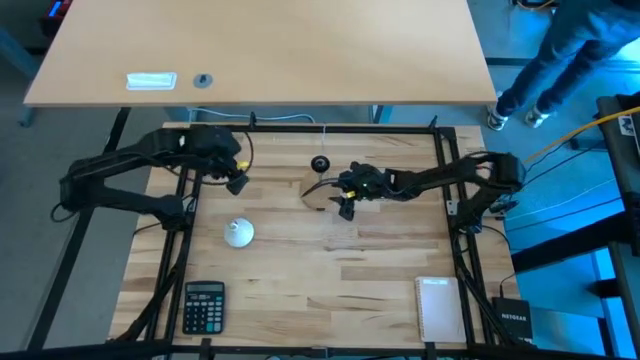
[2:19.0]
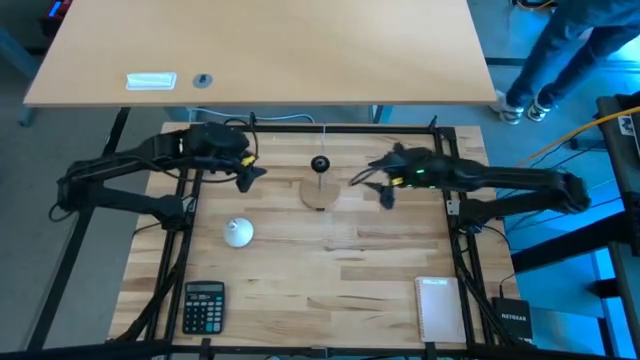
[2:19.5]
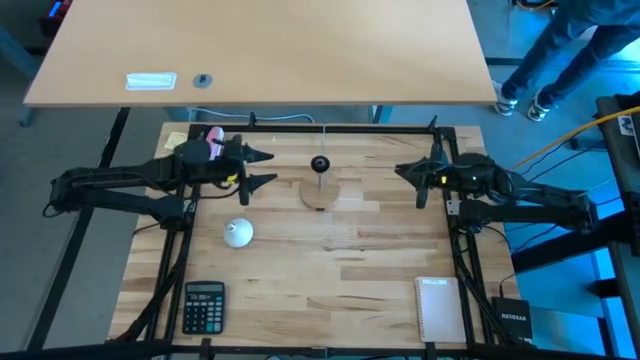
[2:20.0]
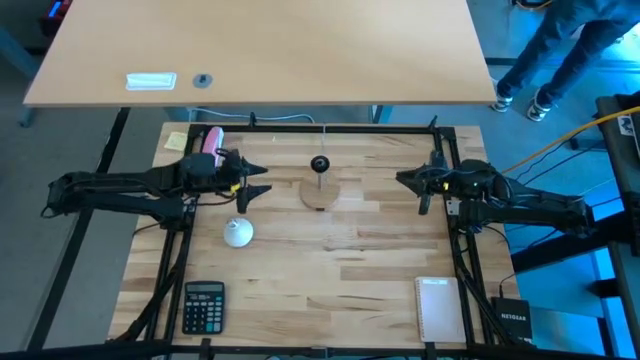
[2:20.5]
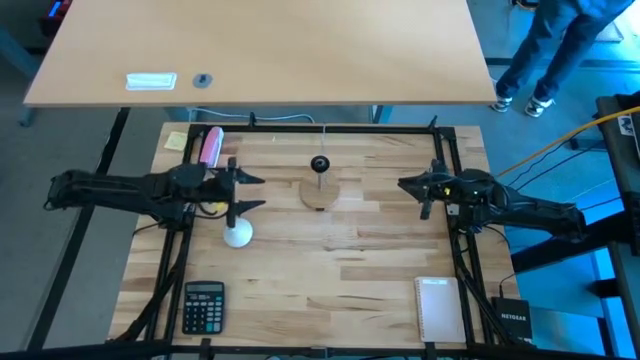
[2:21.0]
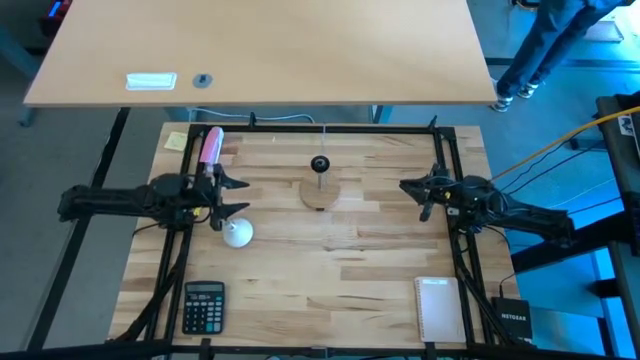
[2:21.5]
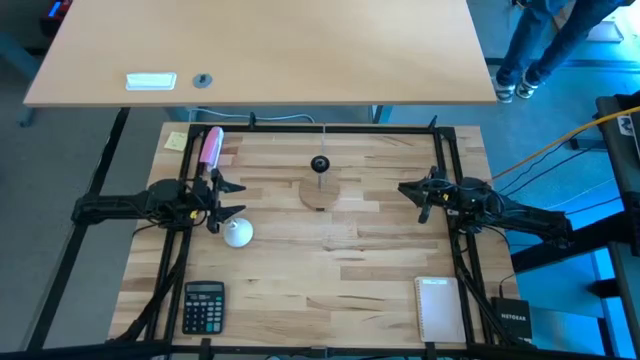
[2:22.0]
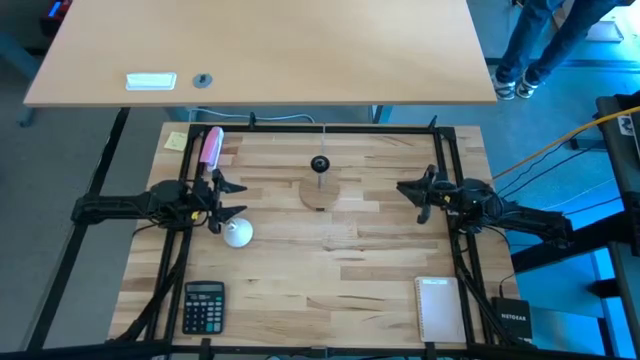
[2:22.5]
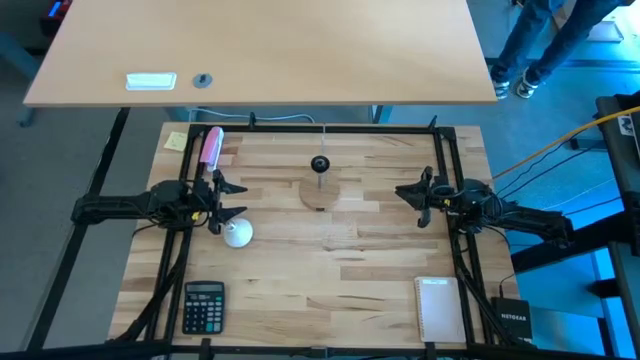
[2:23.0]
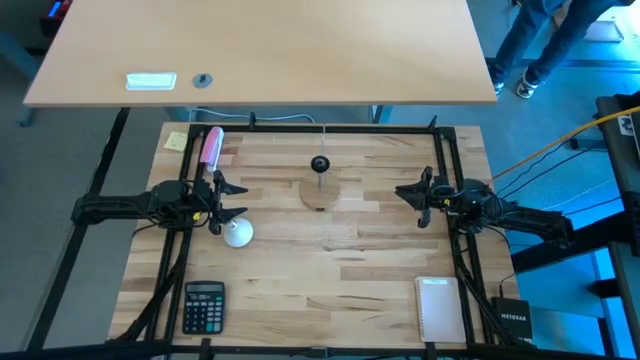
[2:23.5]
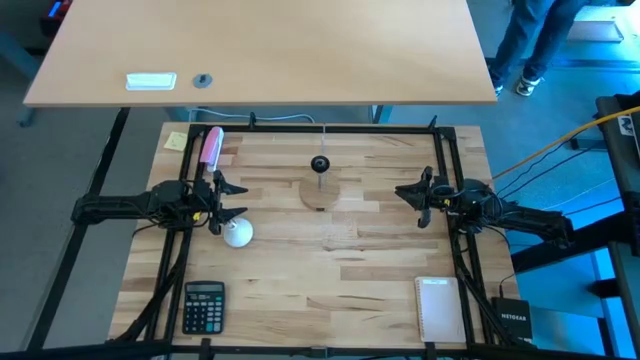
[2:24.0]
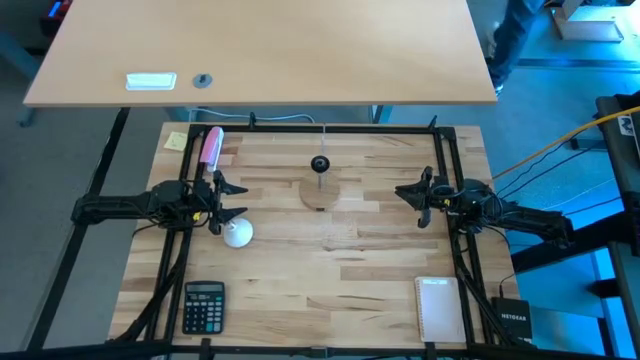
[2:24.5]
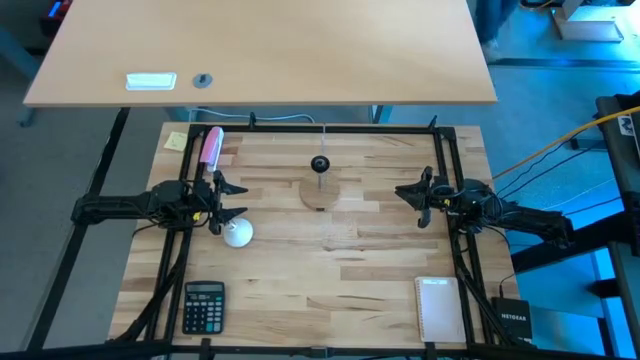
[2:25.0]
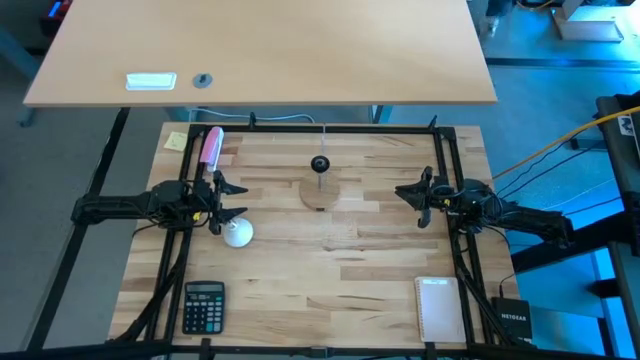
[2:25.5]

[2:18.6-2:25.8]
Task: Screw lightbulb
Return to Home Position

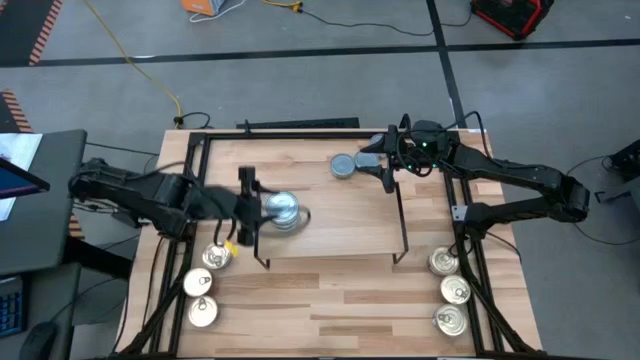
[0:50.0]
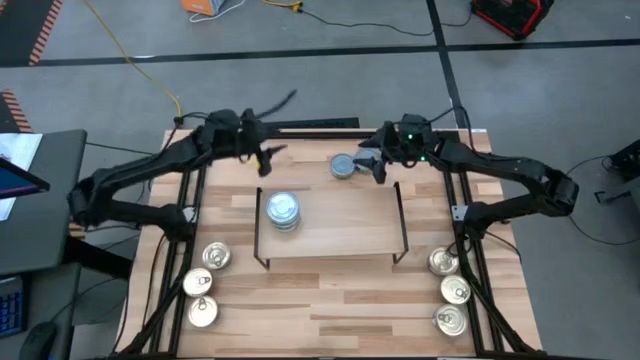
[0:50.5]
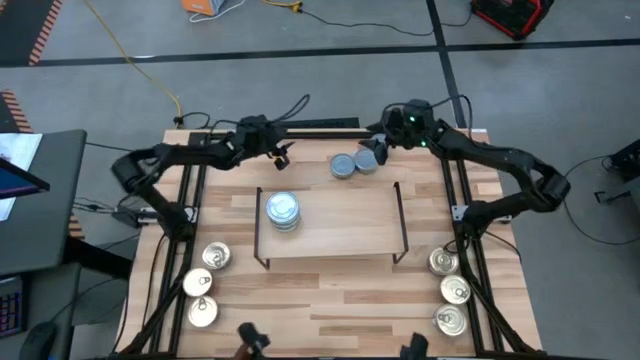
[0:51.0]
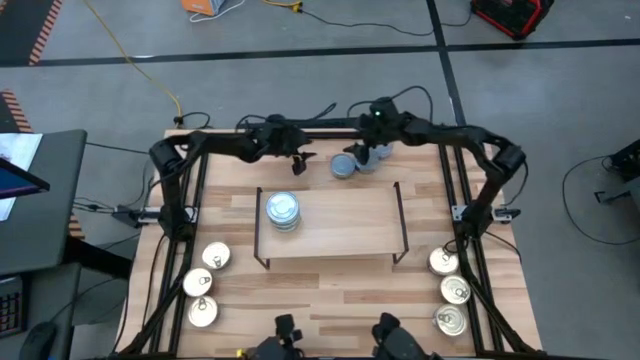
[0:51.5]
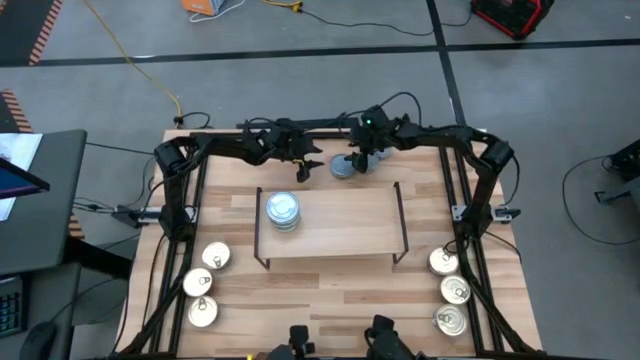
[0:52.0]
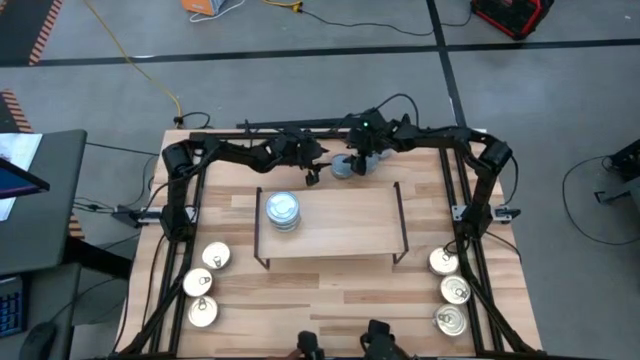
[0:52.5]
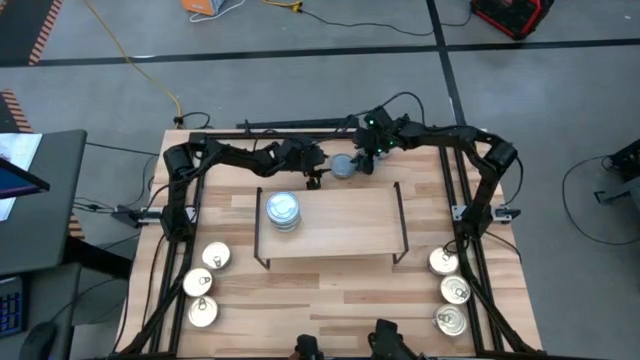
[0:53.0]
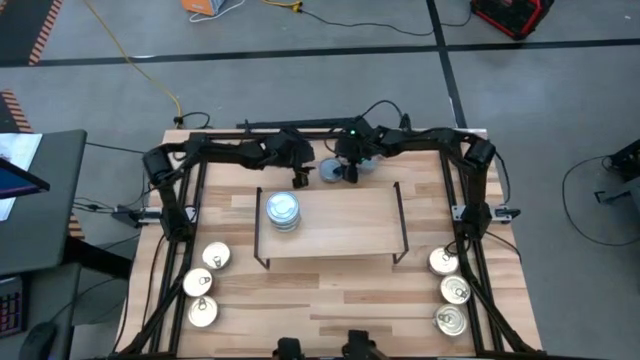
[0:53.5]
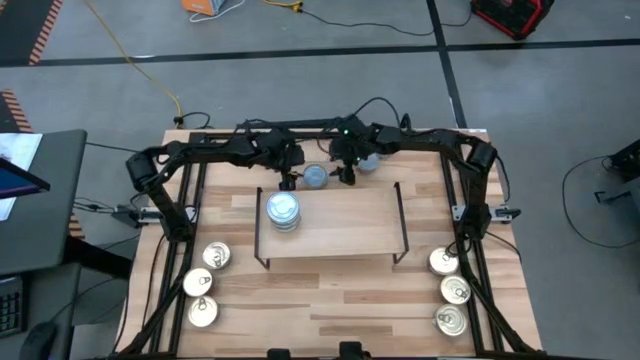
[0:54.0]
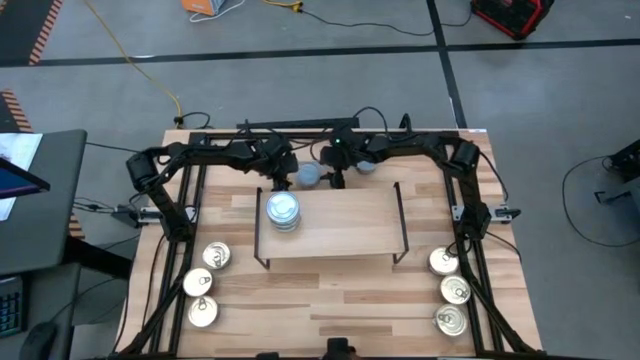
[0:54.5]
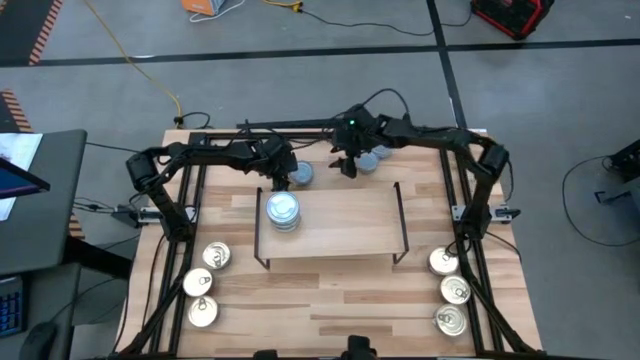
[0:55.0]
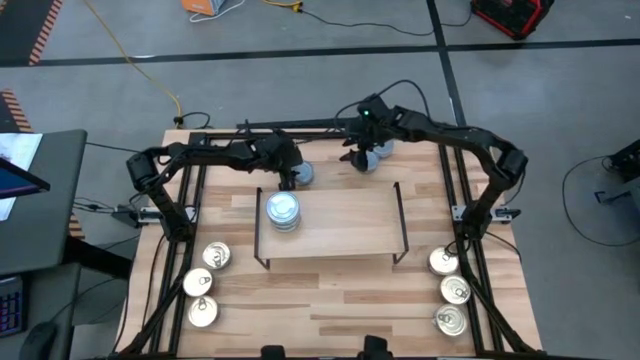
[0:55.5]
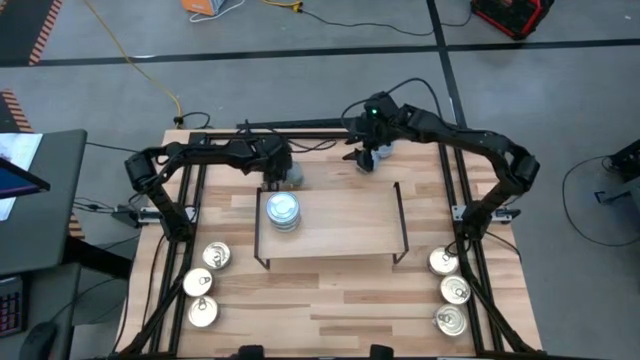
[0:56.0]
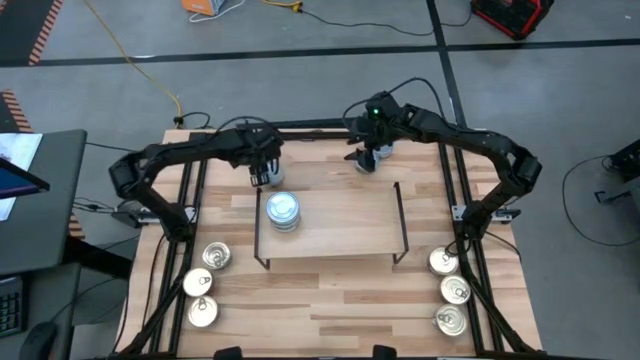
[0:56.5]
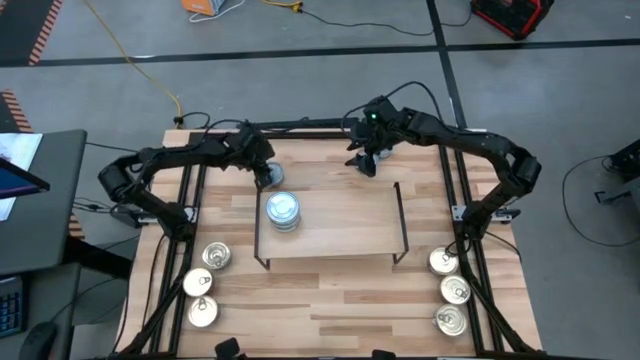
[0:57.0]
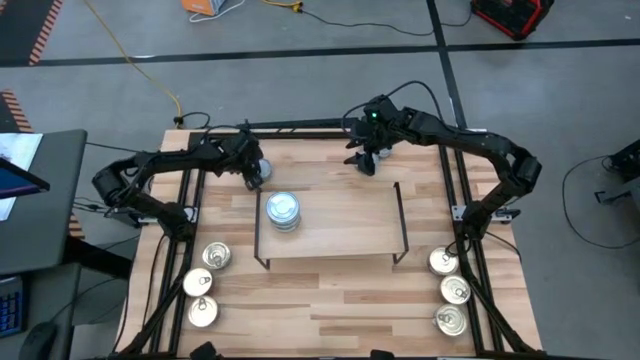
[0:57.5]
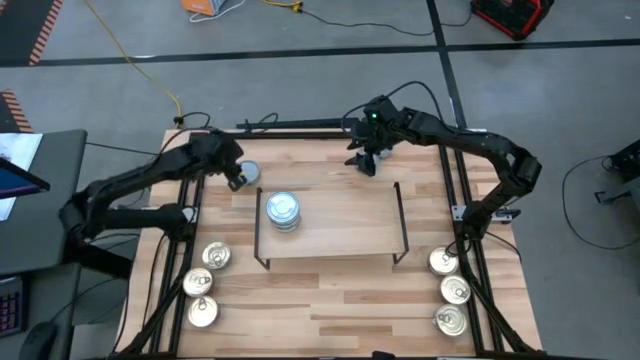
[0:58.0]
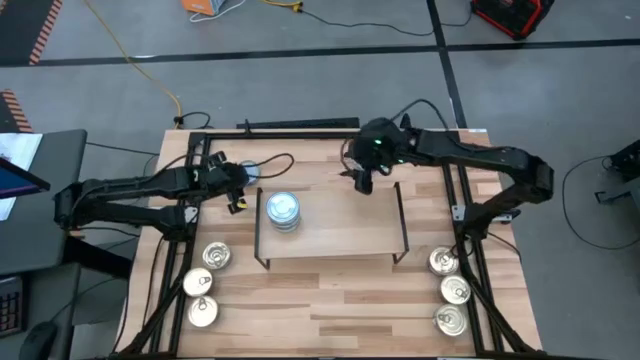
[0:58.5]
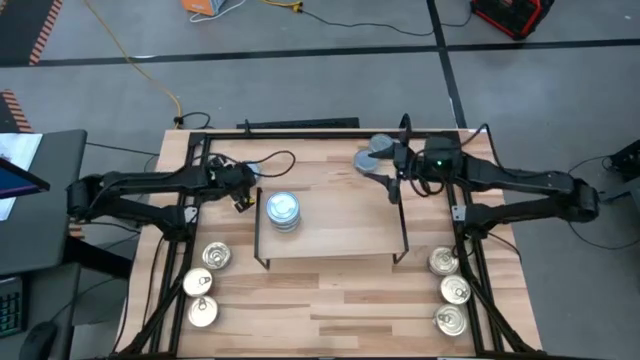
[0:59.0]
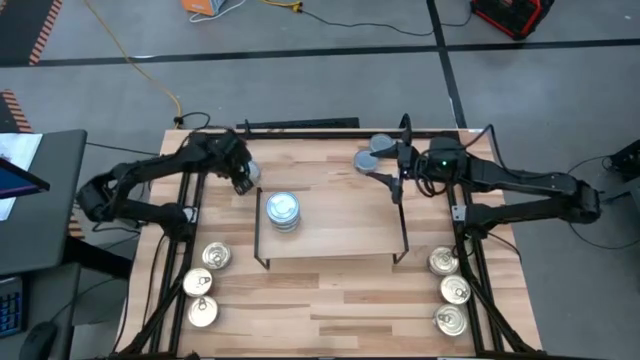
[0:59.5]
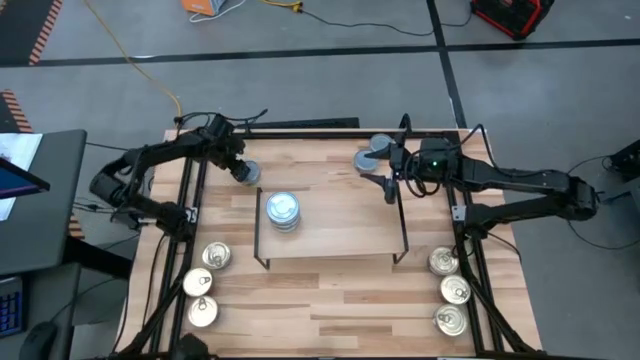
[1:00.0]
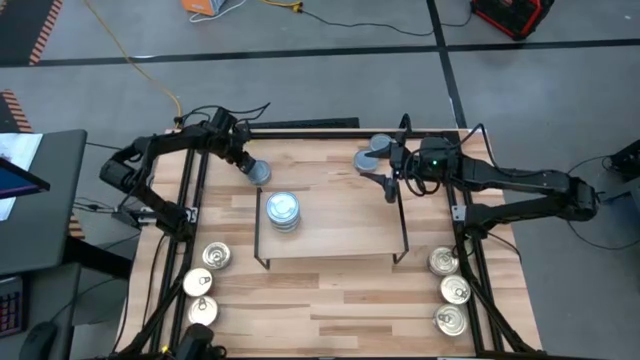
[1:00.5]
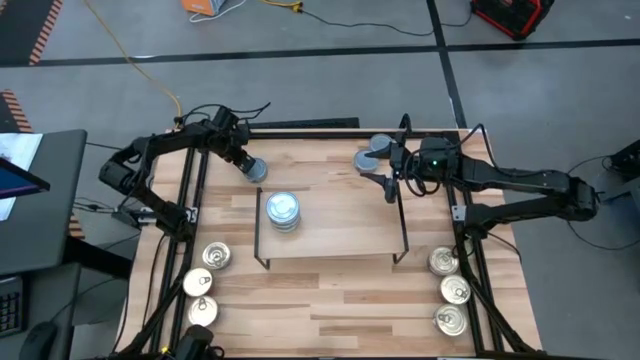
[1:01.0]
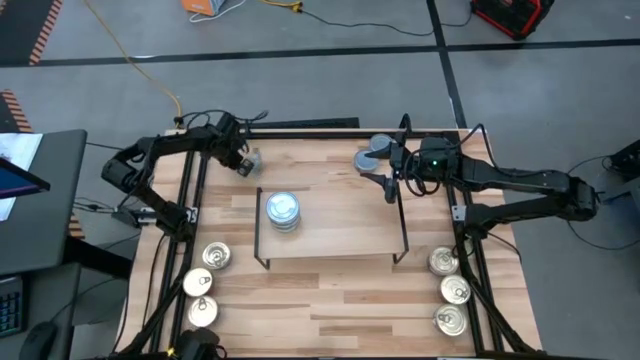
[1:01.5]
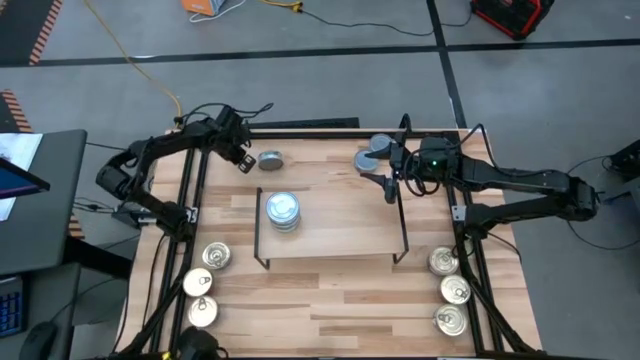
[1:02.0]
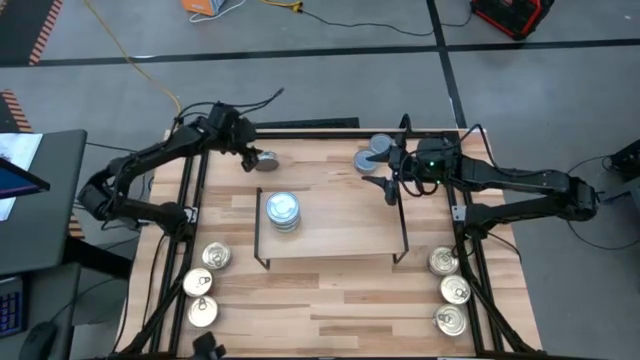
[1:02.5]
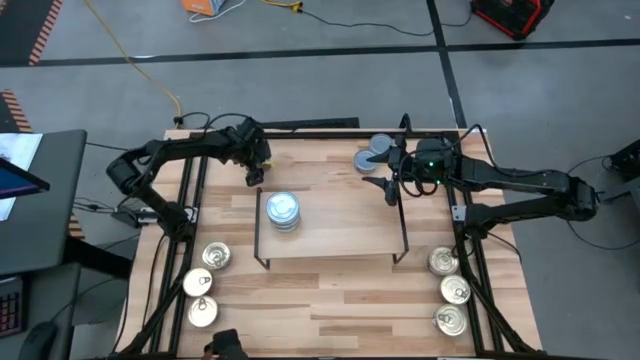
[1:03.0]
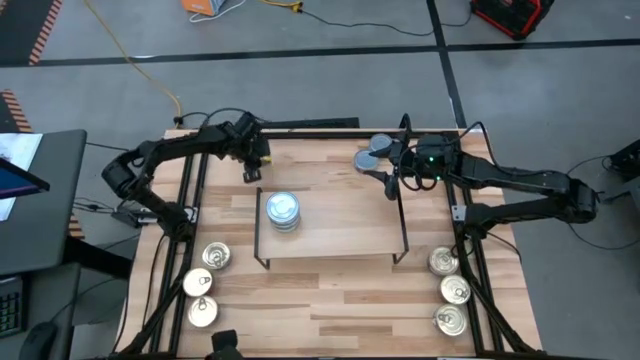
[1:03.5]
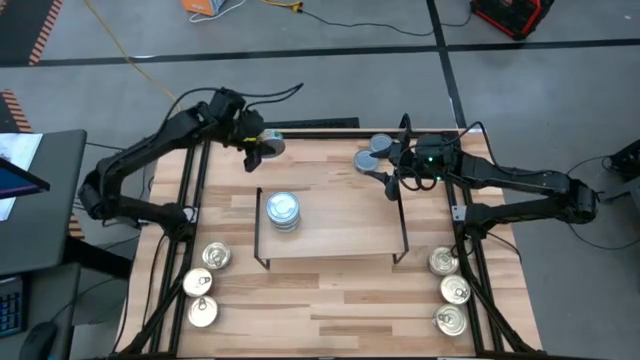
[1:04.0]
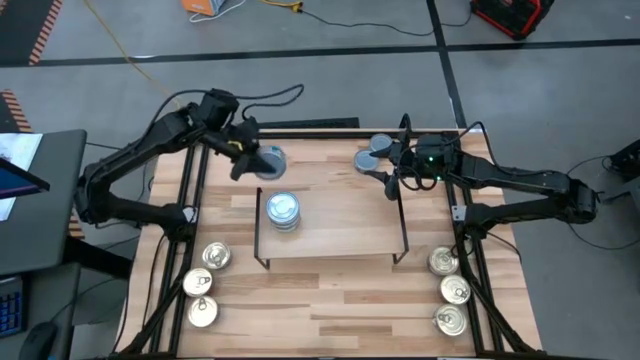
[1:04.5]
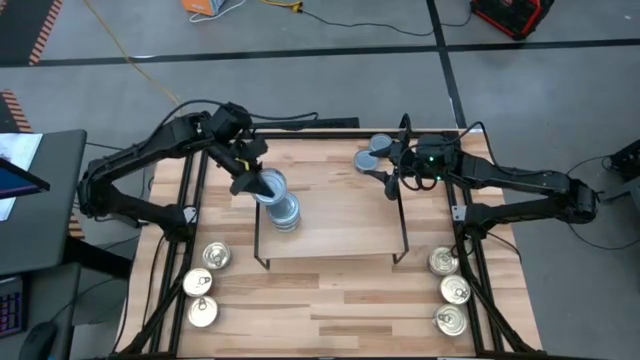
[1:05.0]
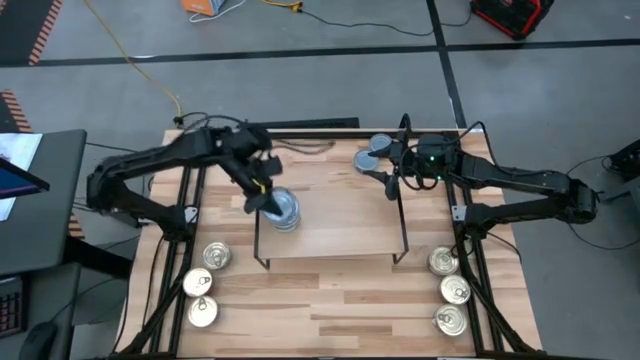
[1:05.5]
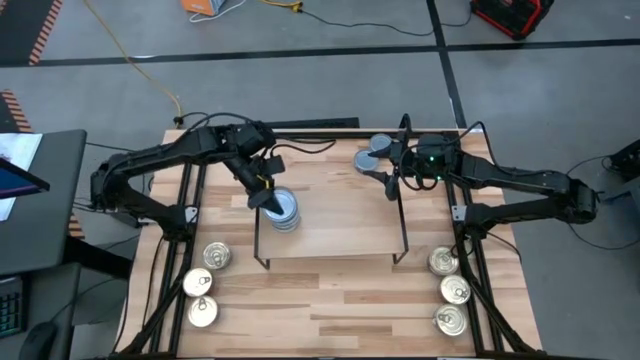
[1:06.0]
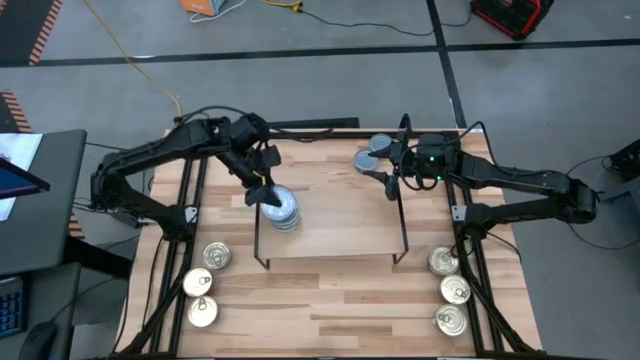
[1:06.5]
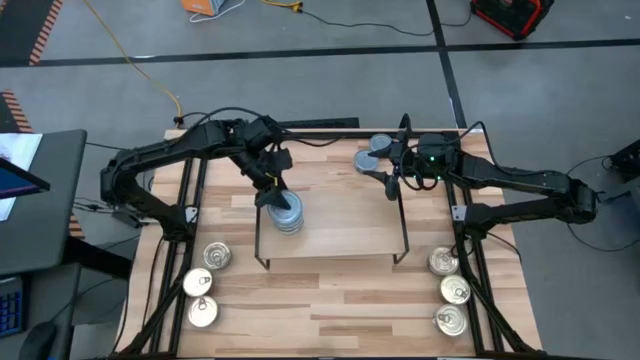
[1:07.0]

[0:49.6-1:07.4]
Task: Stack canned seafood by type on shelf
Stack the green tuna can on top of the green tuna can on the shelf
